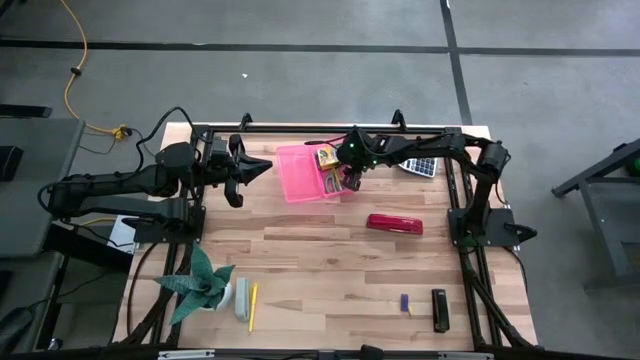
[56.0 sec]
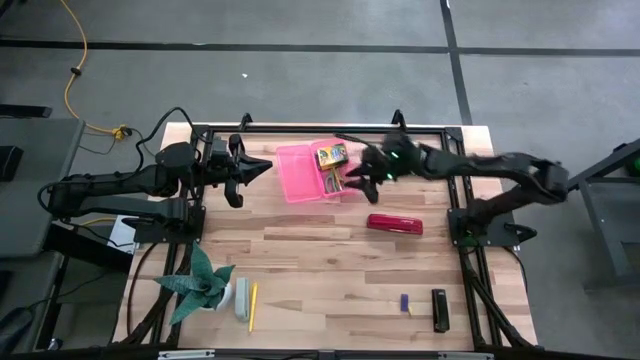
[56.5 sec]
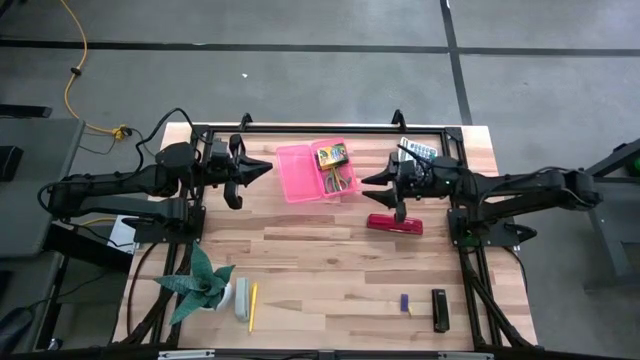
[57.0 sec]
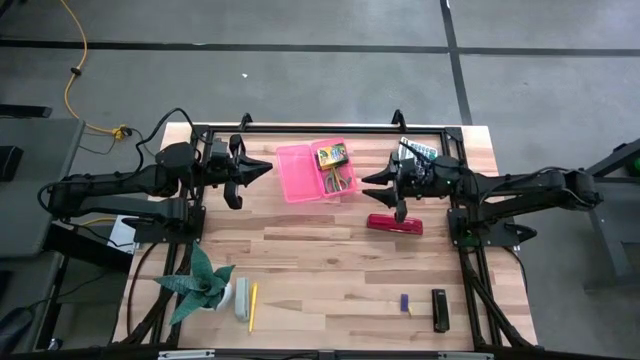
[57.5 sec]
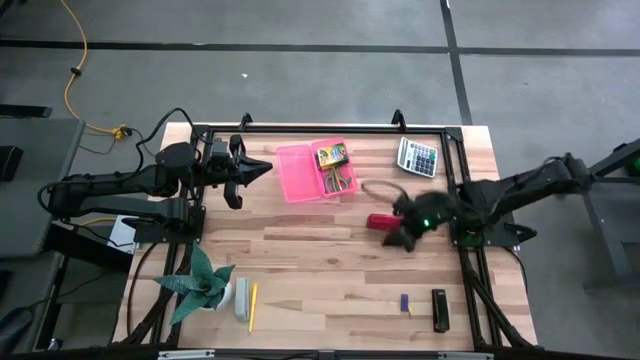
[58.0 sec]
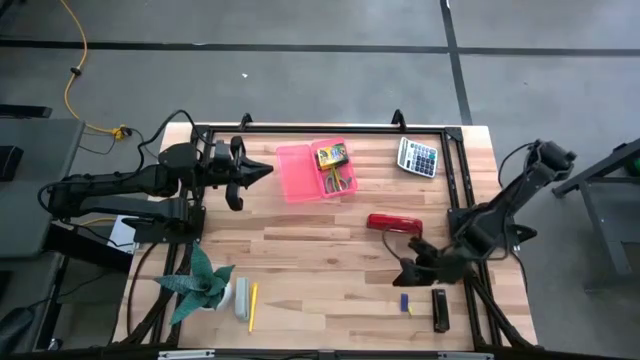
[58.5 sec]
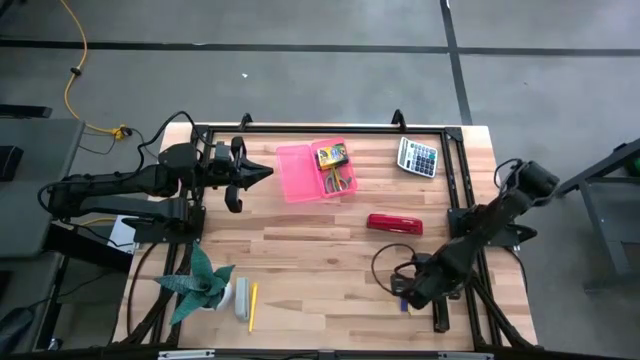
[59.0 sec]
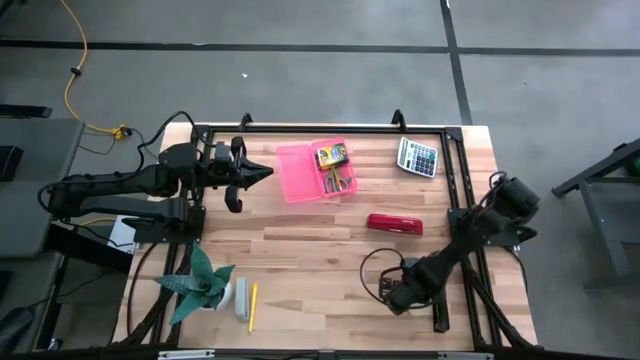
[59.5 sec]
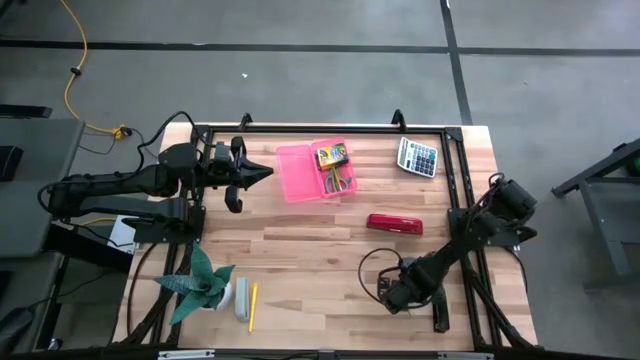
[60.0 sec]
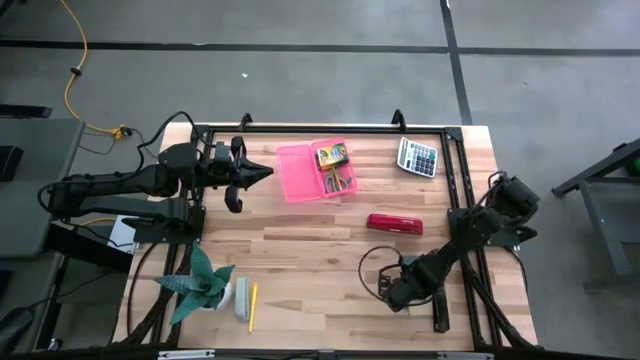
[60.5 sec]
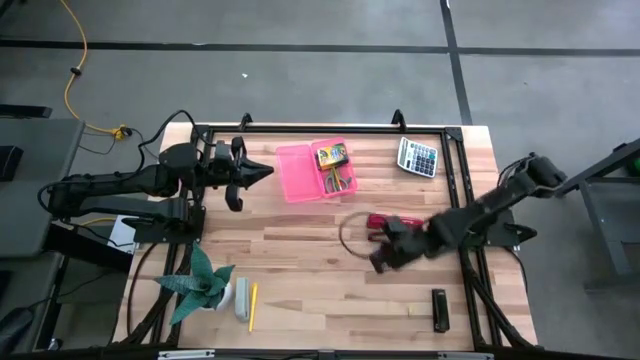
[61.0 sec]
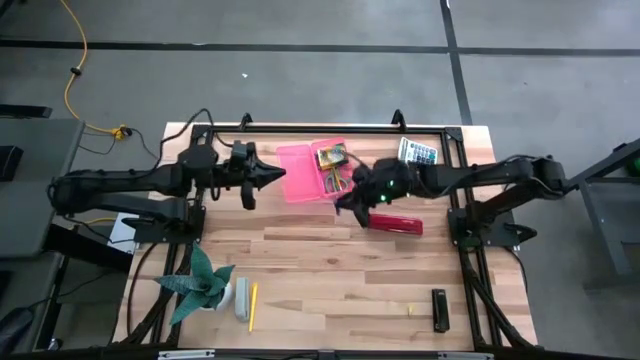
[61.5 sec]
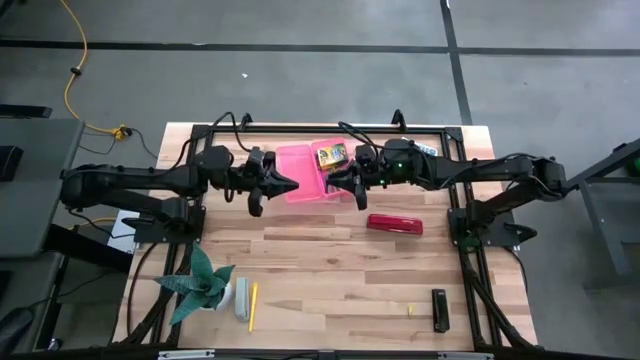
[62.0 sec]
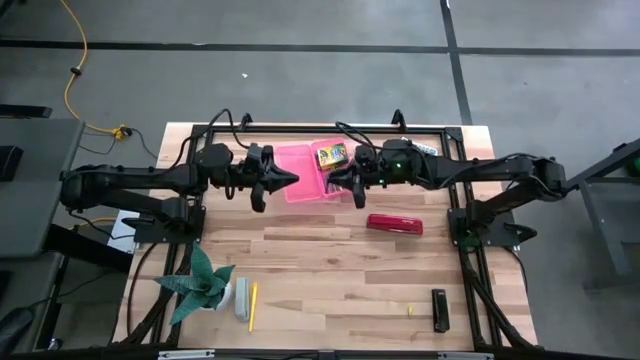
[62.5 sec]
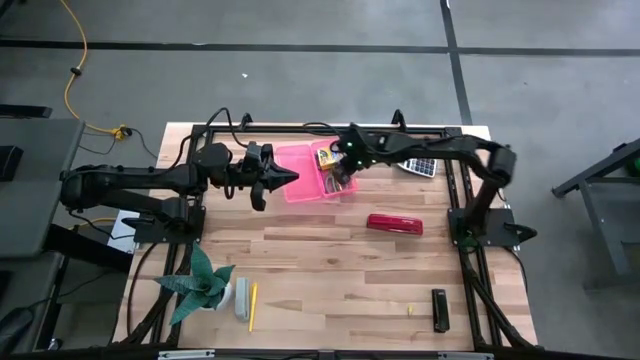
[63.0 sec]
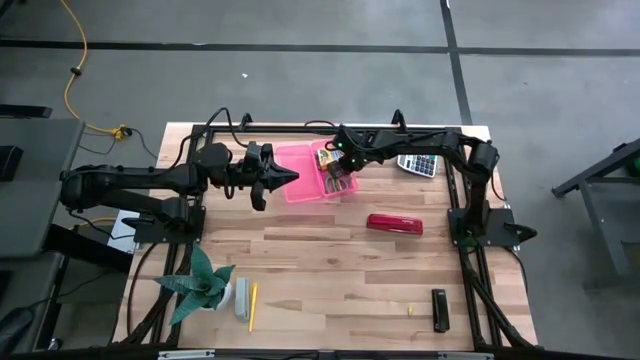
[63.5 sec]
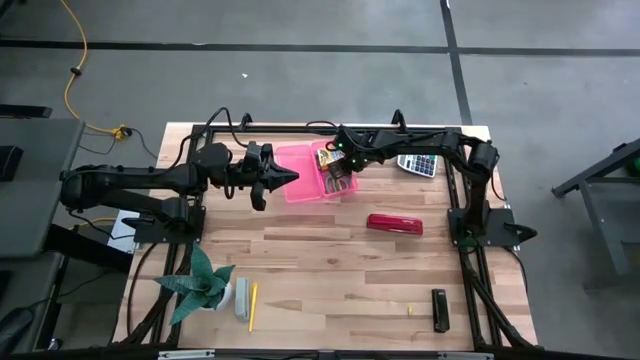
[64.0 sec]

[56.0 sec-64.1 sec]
Task: Pack school essentials
Put the blue eraser into the pink supply box

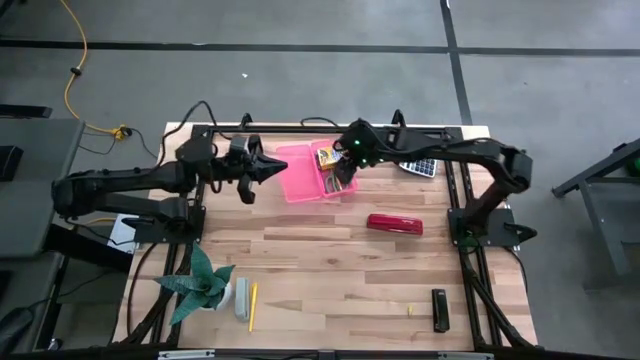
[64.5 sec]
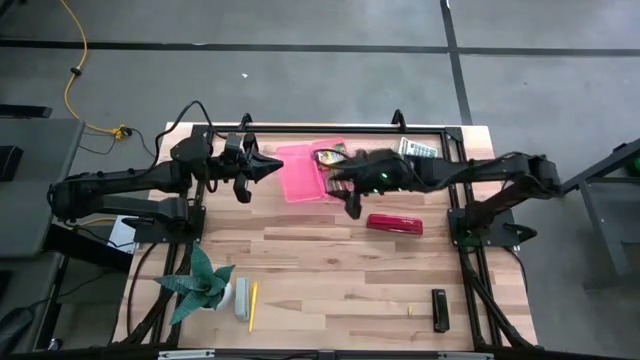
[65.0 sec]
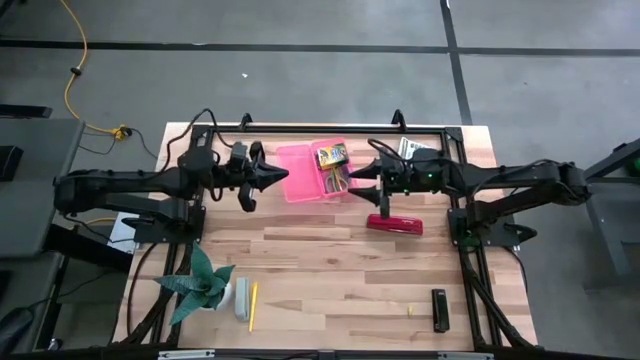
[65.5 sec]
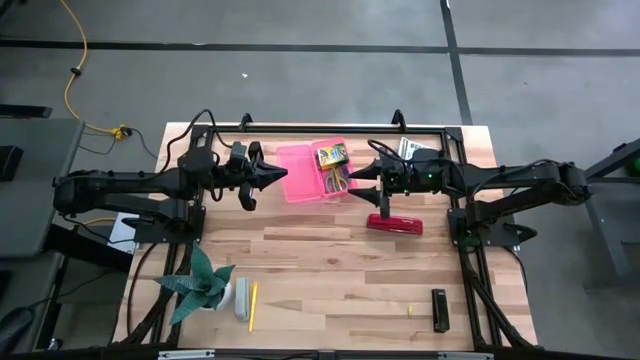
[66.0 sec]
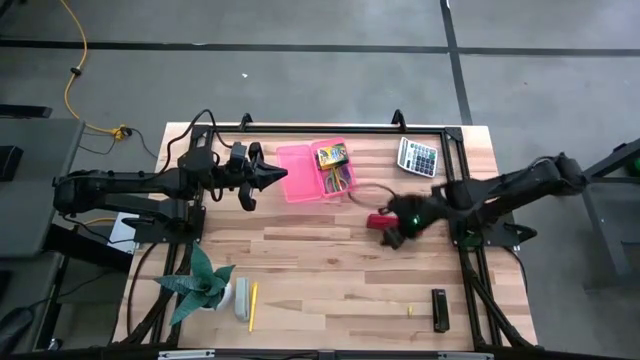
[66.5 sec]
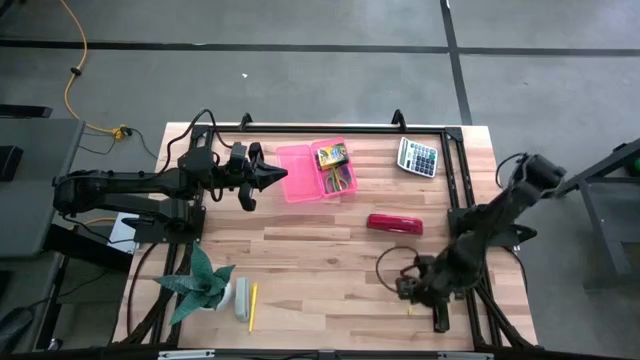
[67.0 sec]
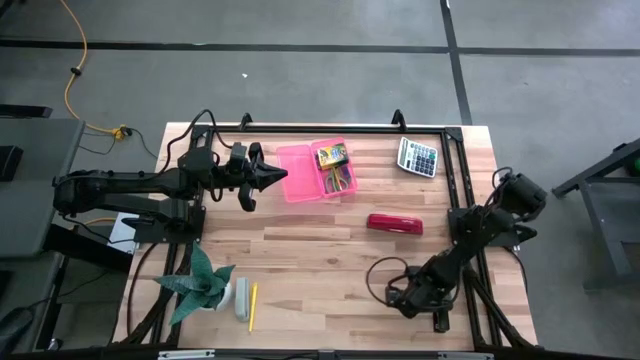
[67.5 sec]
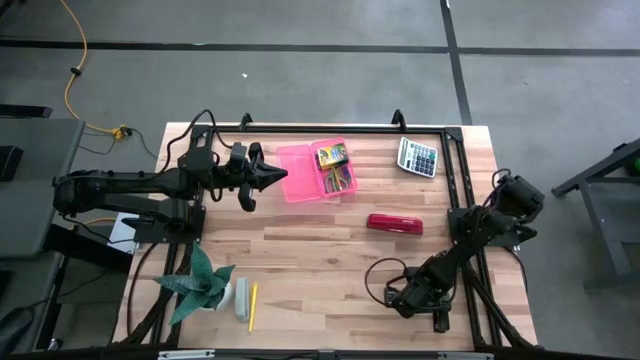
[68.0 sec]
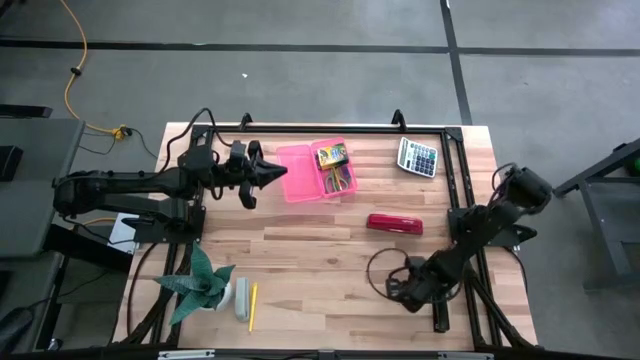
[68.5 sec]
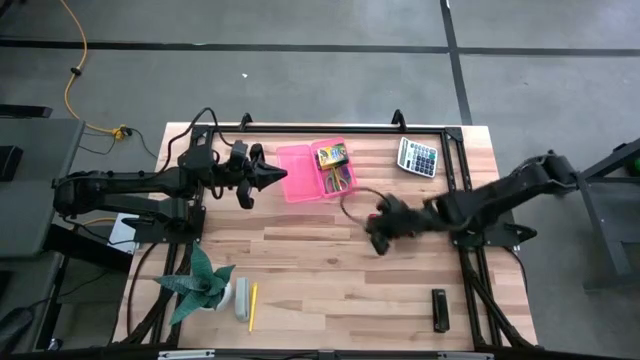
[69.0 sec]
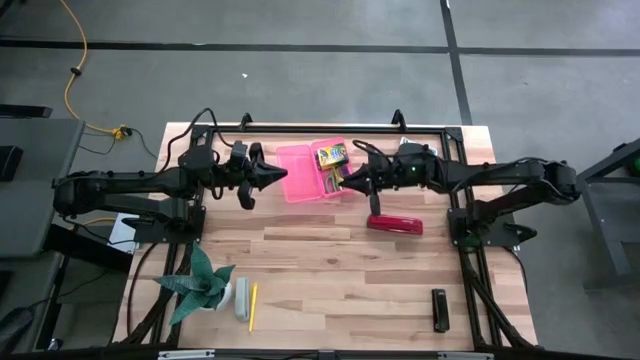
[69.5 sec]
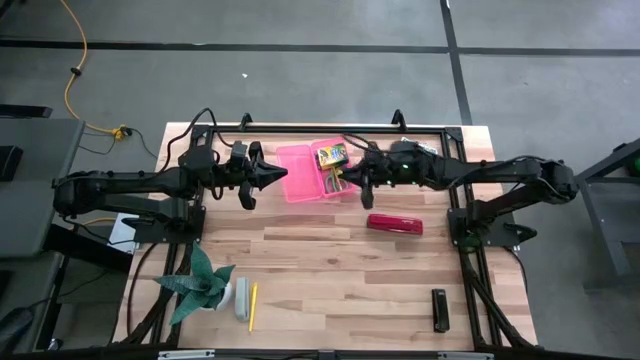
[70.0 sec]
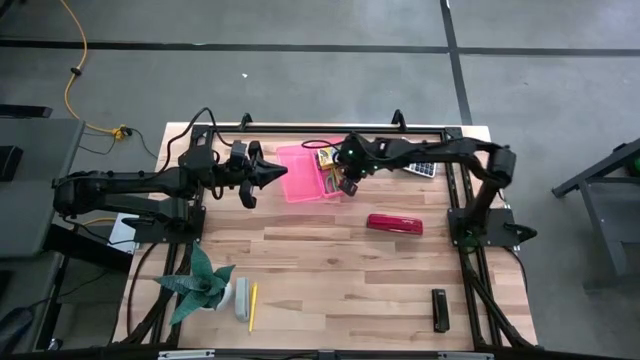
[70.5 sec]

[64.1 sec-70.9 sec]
Put the yellow pencil top eraser into the pink supply box

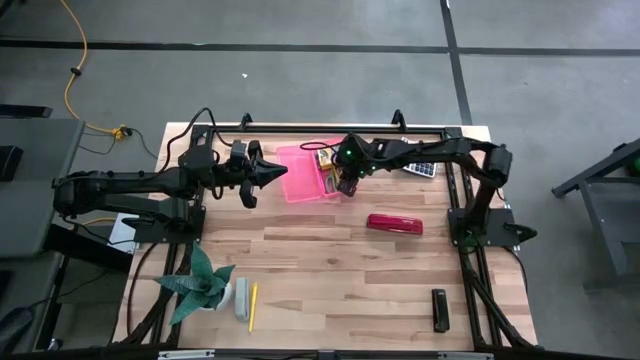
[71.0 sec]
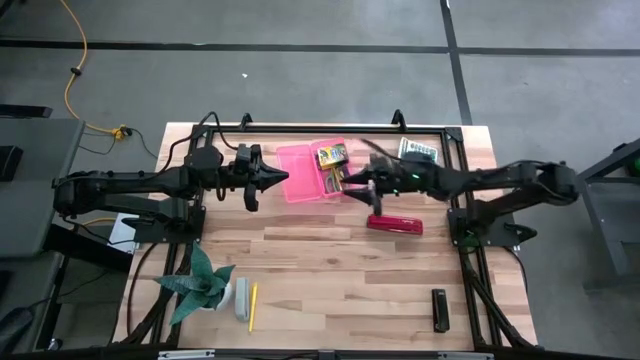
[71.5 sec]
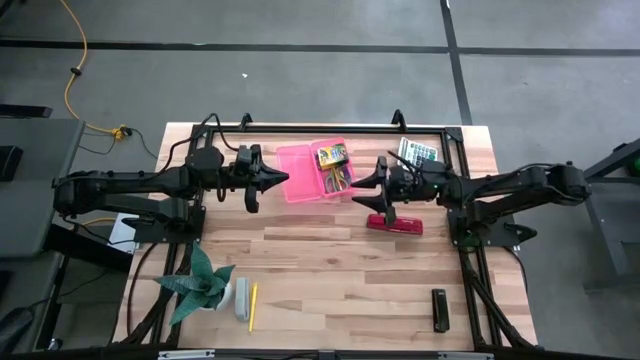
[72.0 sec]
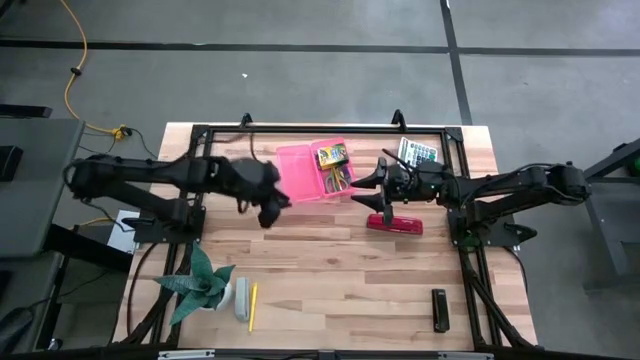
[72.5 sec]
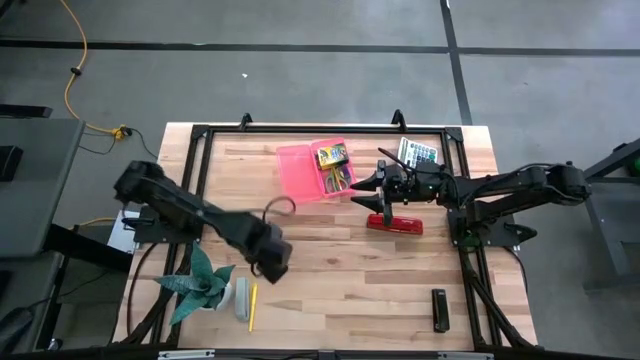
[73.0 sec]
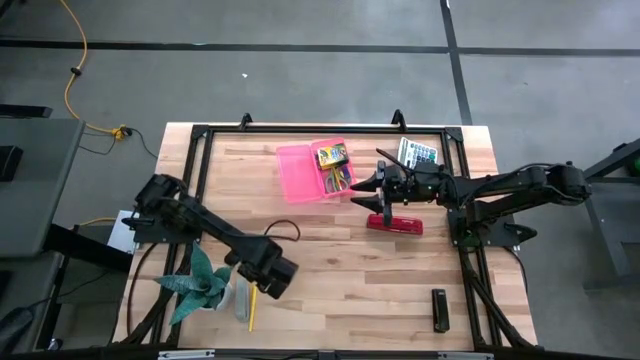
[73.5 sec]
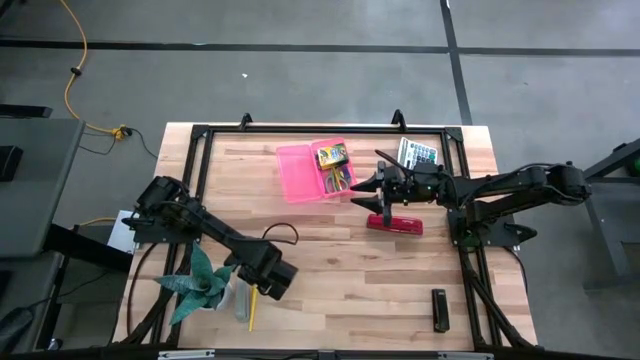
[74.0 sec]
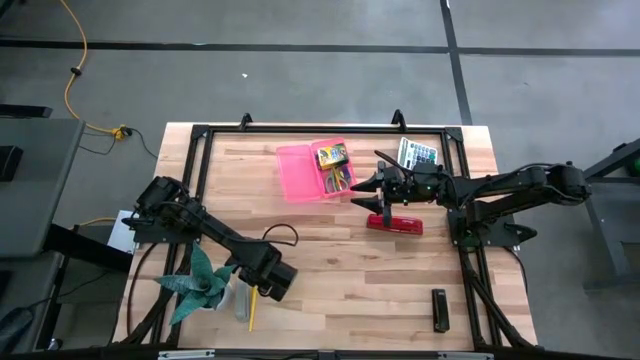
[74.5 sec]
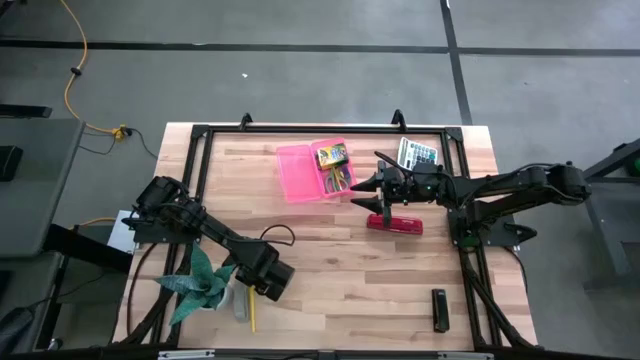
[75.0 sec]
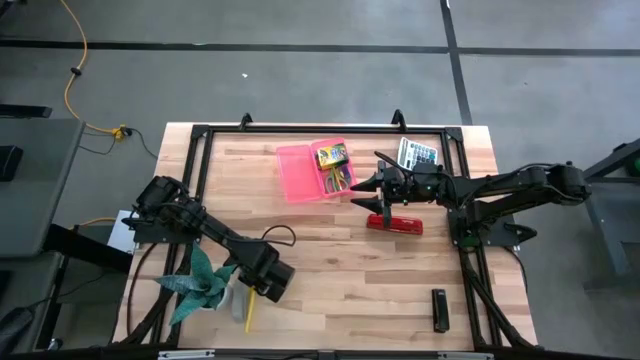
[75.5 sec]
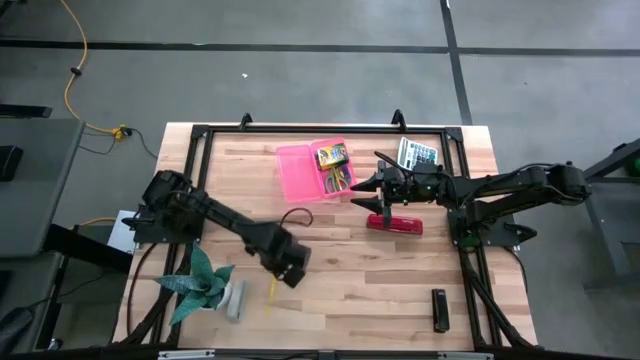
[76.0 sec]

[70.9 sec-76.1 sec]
Put the yellow pen into the pink supply box
